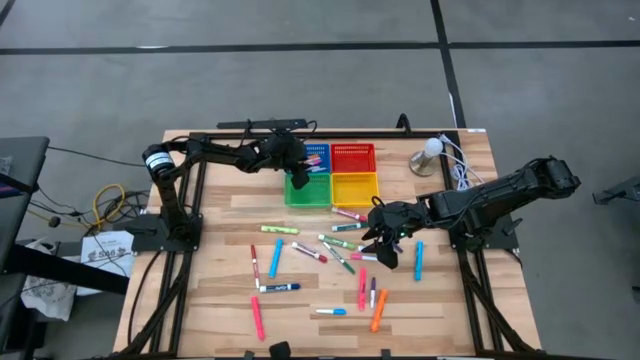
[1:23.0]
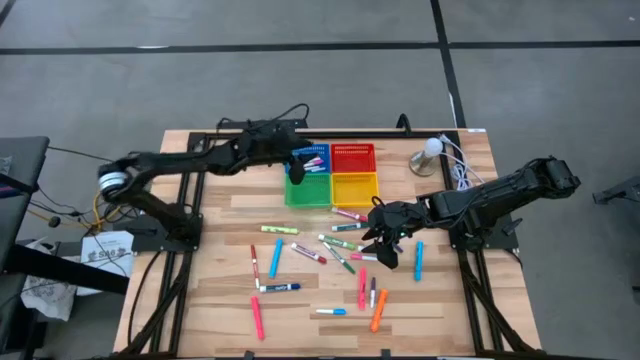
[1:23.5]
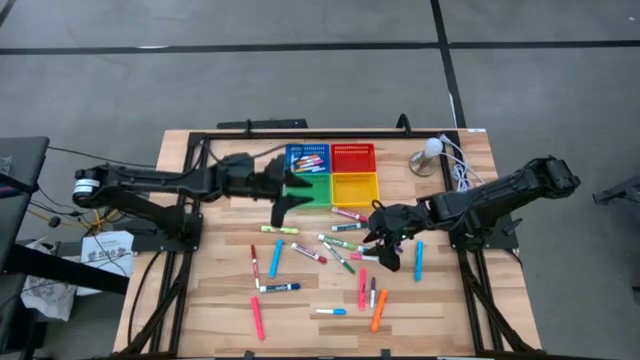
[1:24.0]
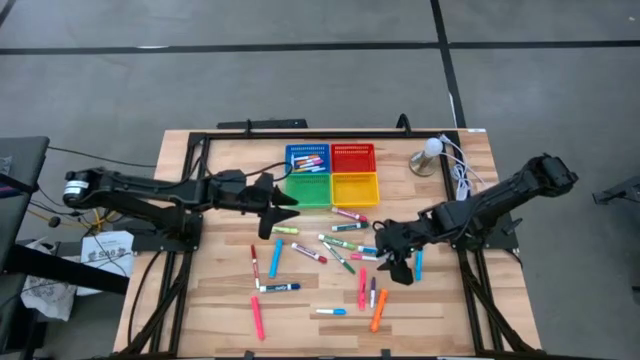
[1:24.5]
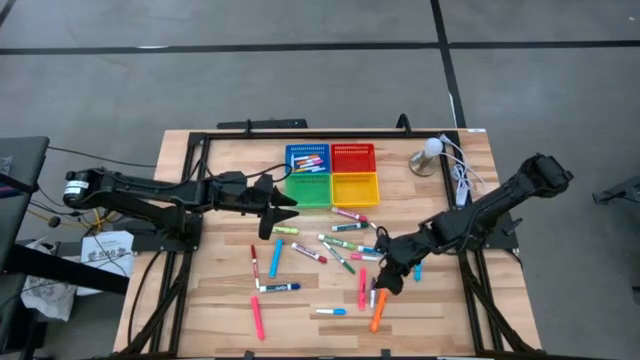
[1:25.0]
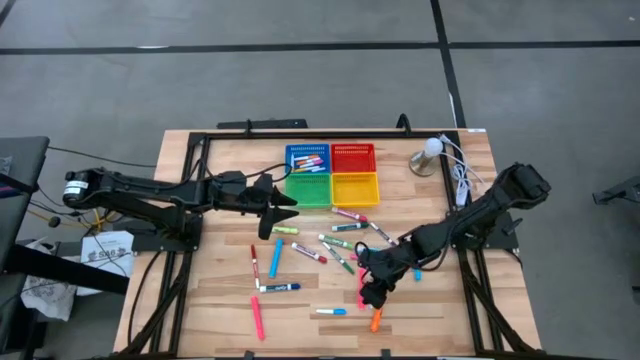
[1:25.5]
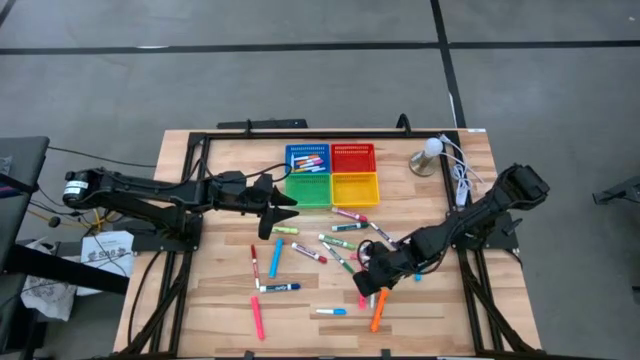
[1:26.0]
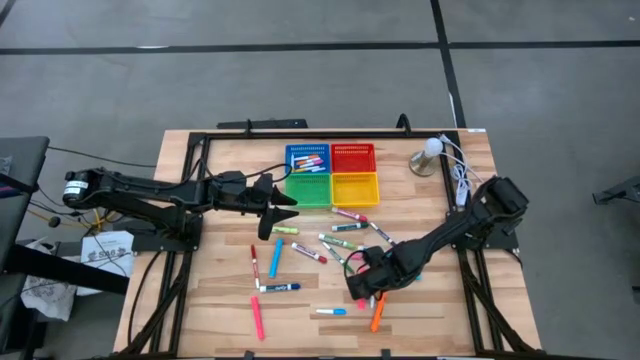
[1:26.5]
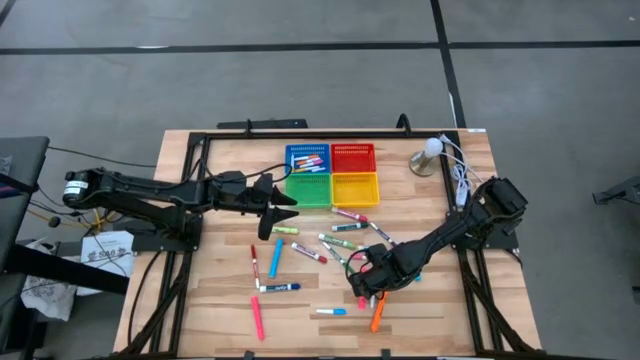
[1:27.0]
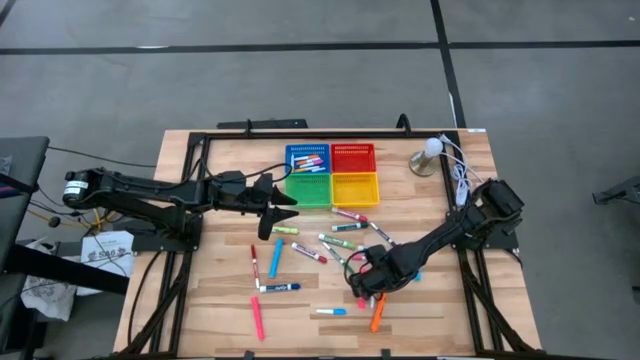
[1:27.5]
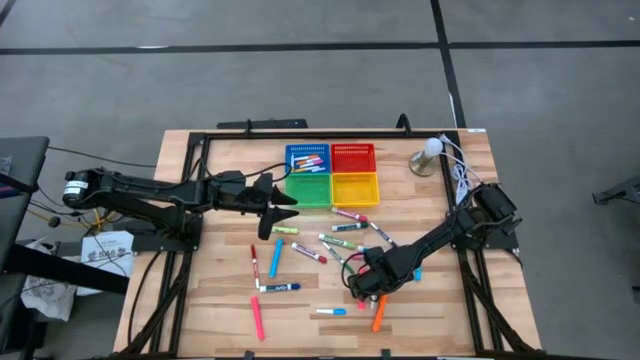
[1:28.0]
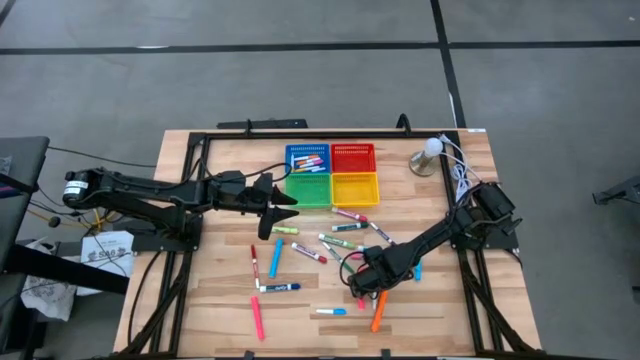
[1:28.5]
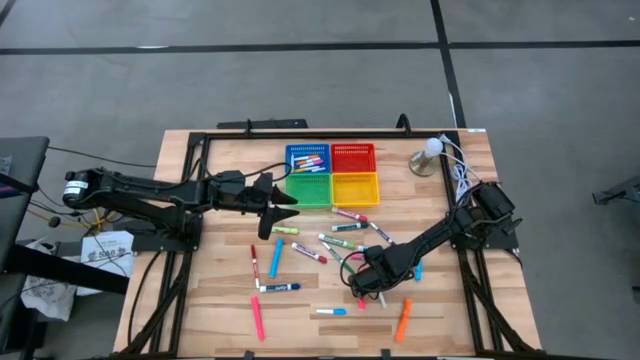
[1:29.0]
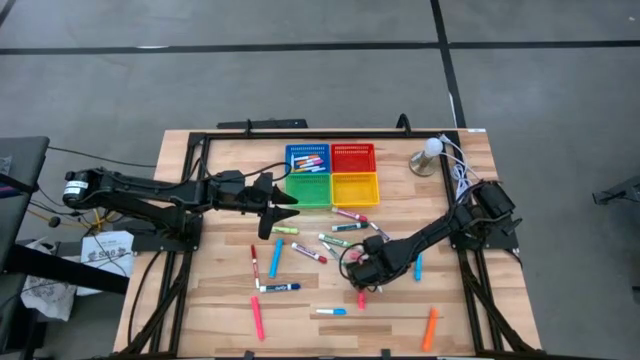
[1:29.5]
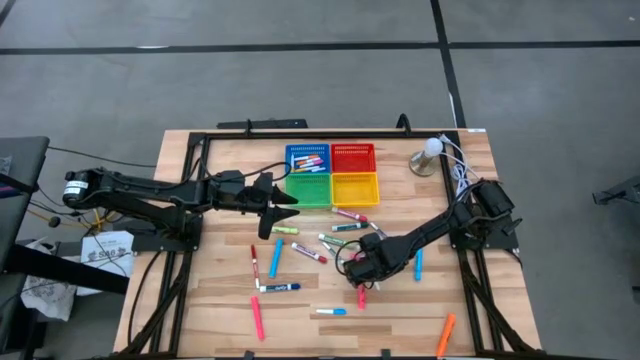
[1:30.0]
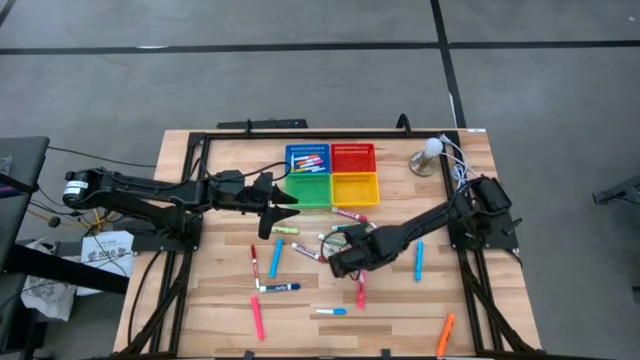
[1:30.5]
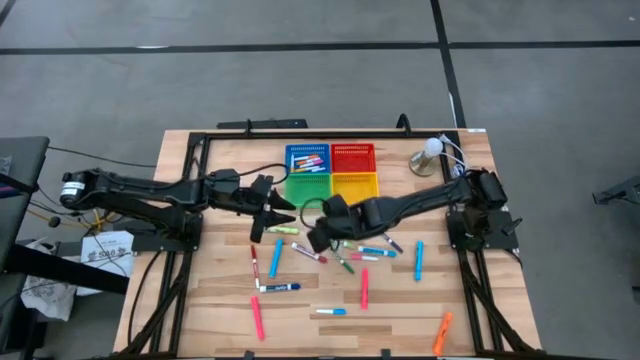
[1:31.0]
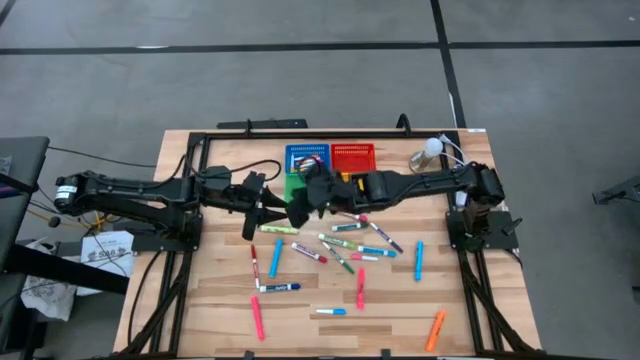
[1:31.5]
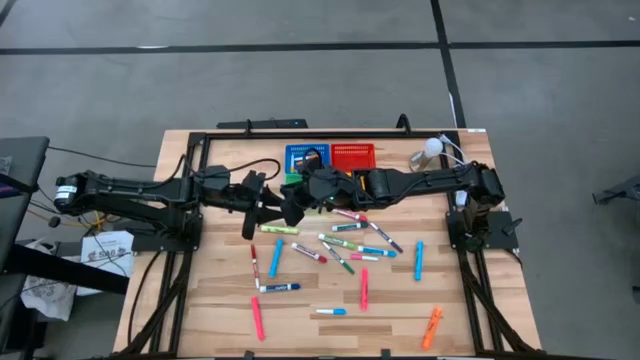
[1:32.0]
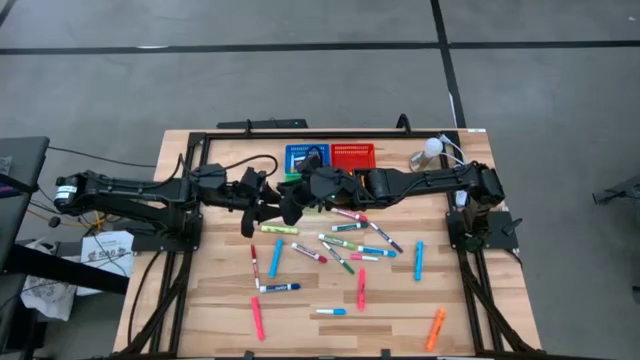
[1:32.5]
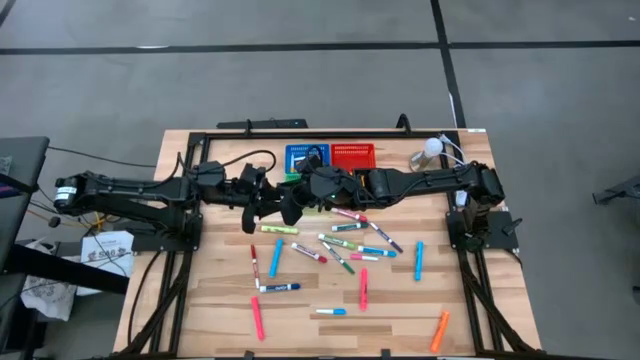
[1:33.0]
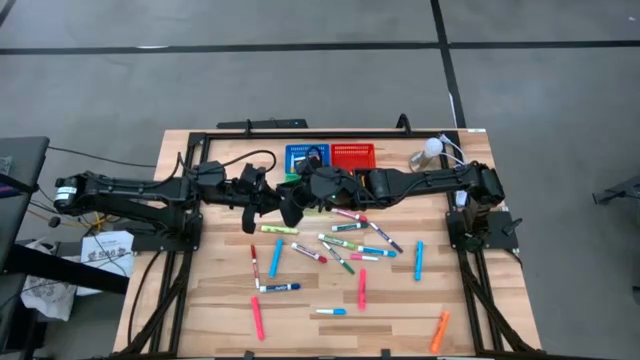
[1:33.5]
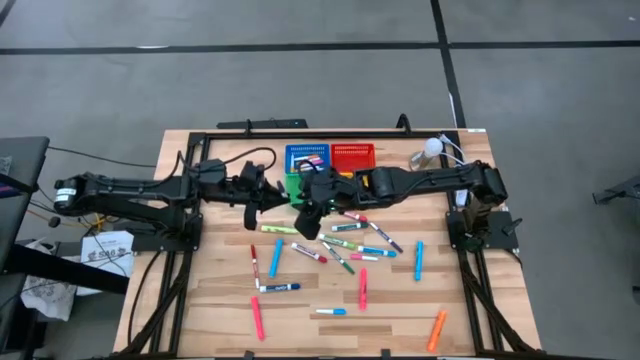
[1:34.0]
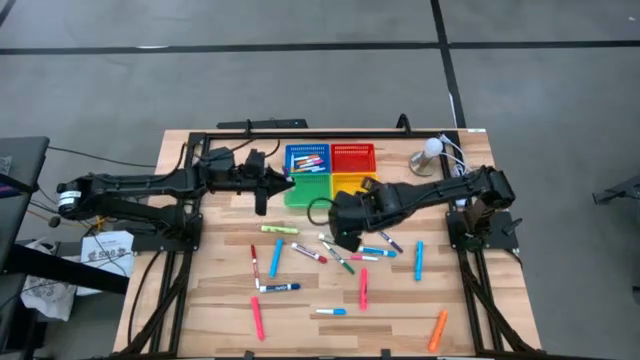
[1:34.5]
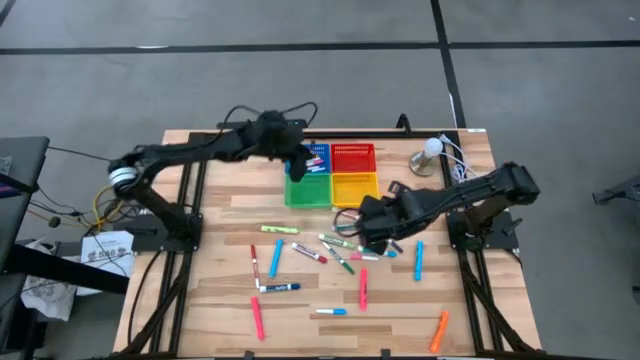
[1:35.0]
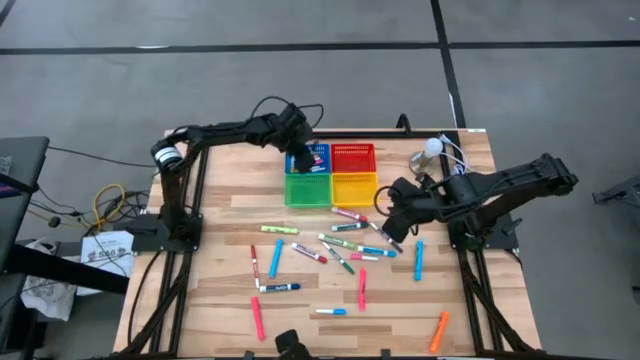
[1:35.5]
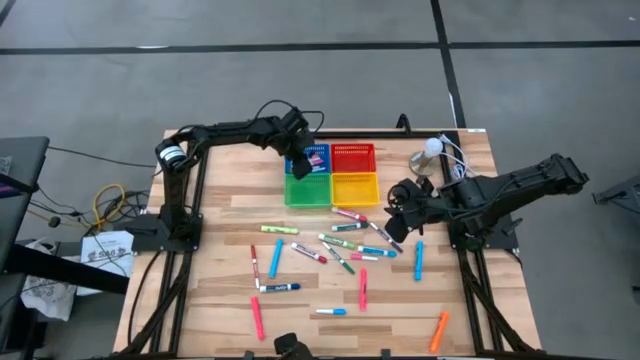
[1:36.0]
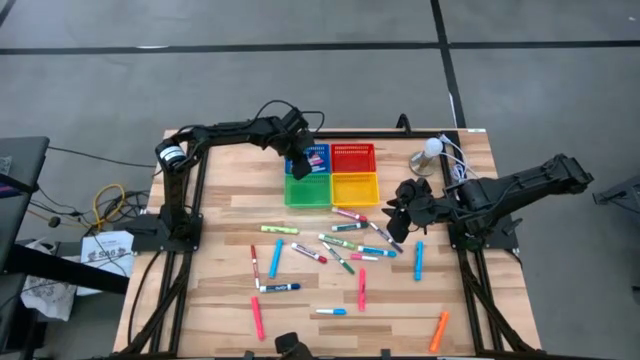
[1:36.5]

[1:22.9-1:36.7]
Task: Pick & Place Markers
Put the small violet marker into the blue bin

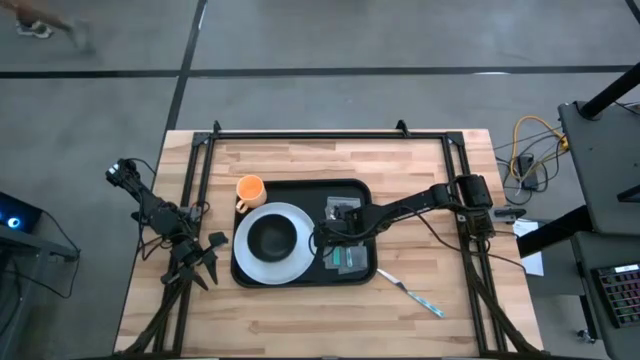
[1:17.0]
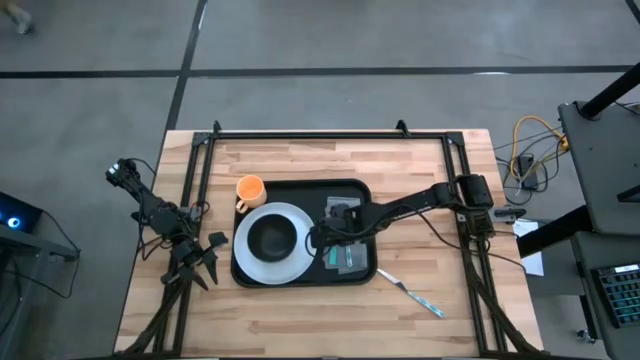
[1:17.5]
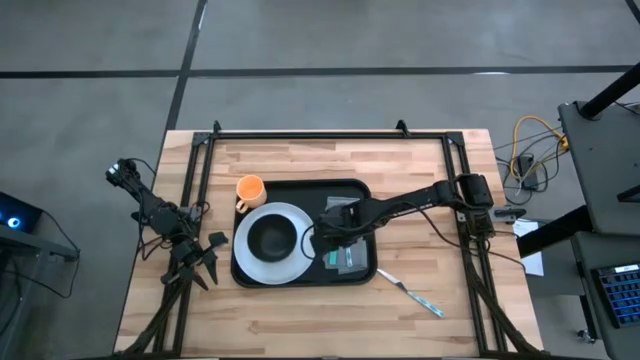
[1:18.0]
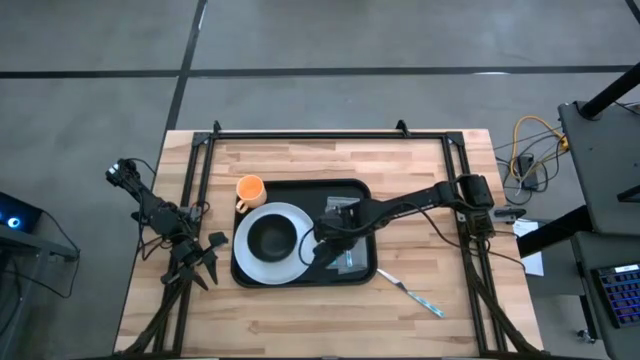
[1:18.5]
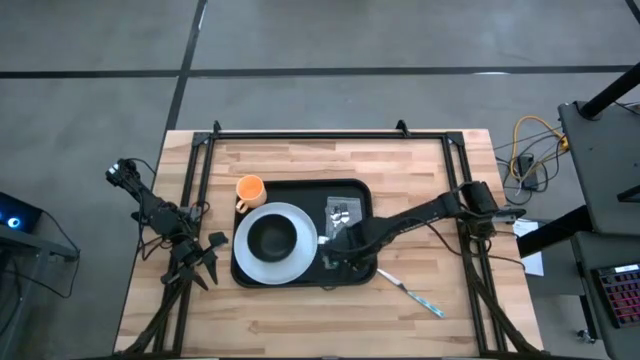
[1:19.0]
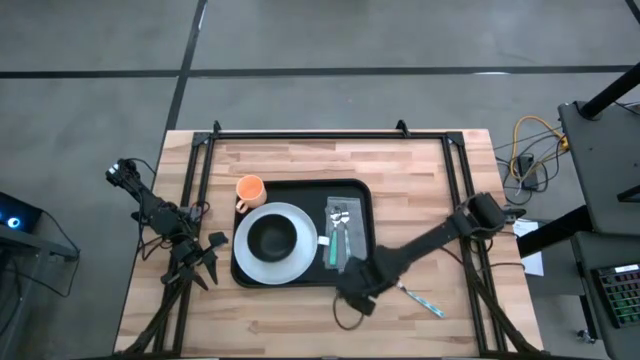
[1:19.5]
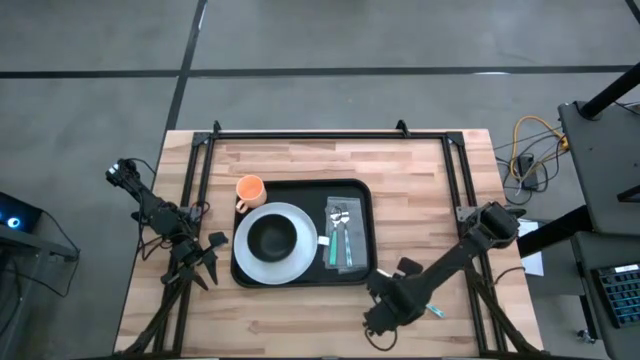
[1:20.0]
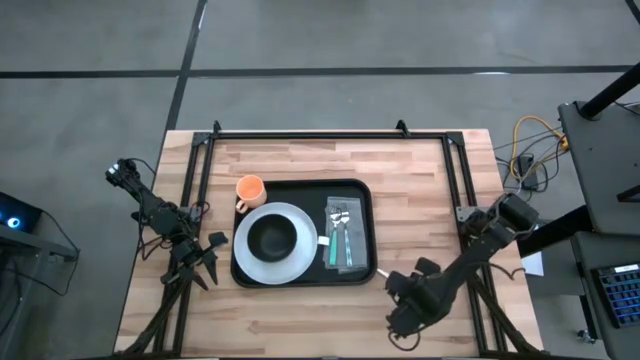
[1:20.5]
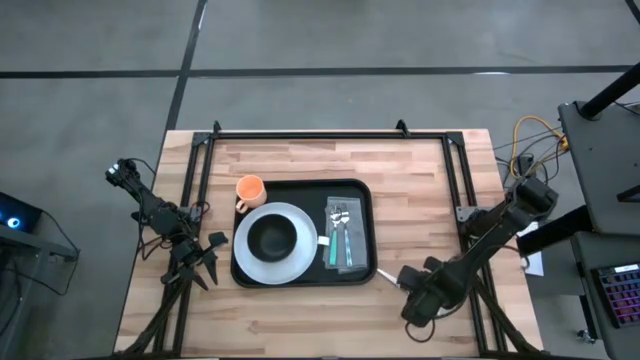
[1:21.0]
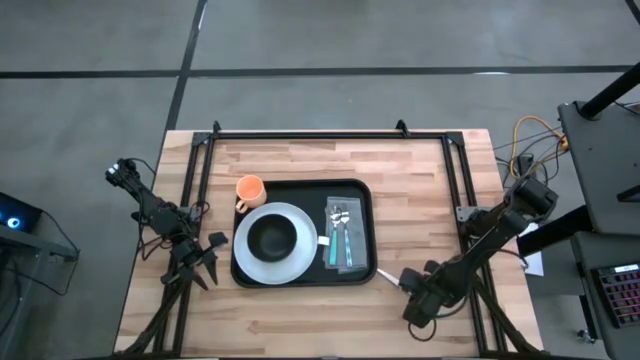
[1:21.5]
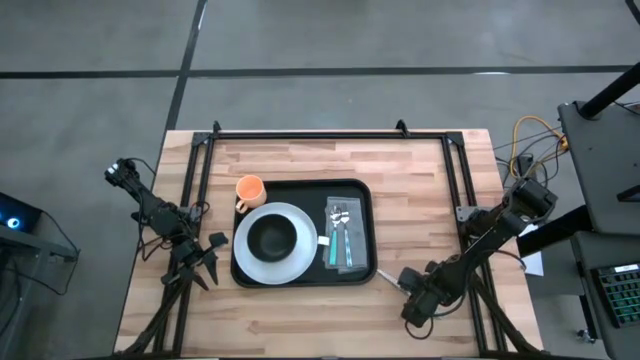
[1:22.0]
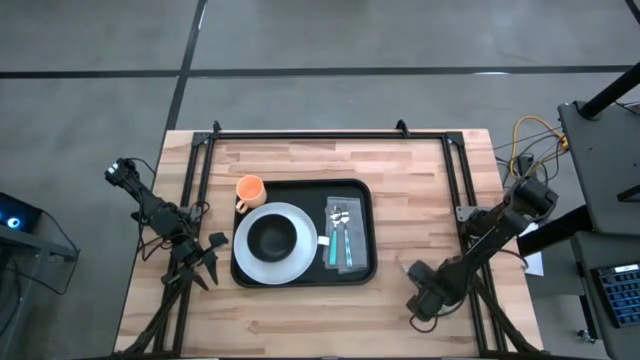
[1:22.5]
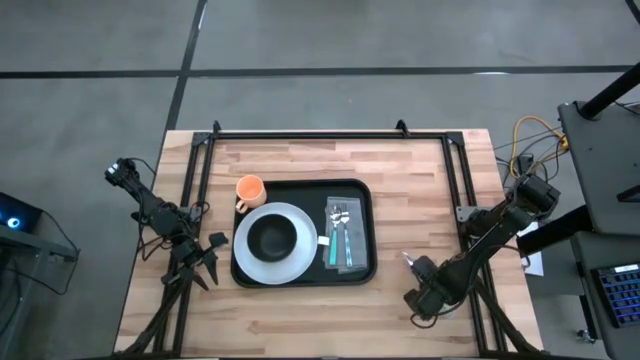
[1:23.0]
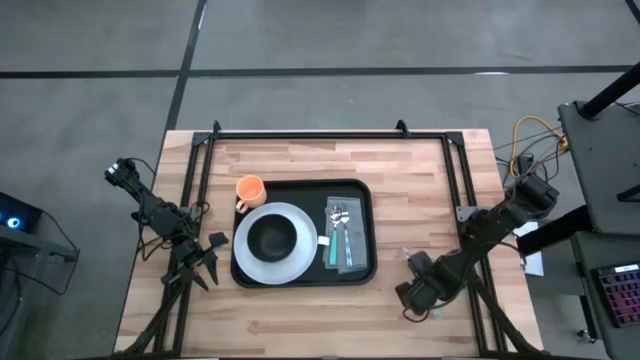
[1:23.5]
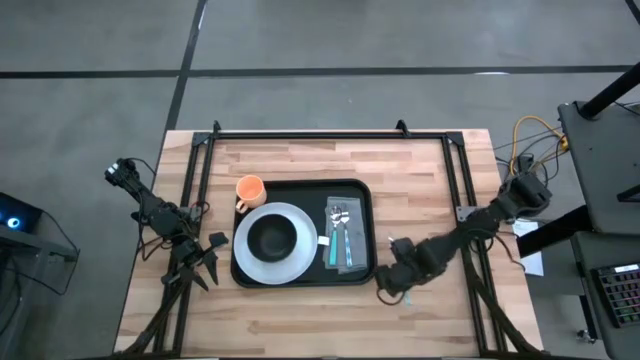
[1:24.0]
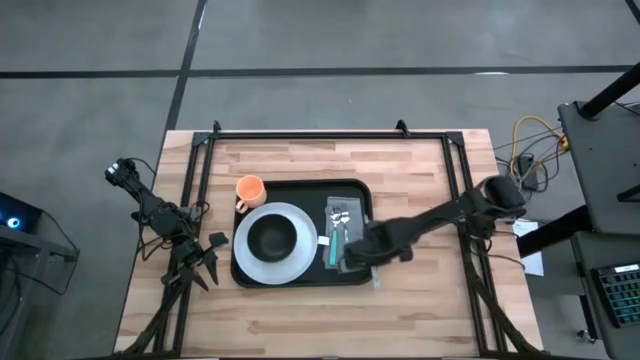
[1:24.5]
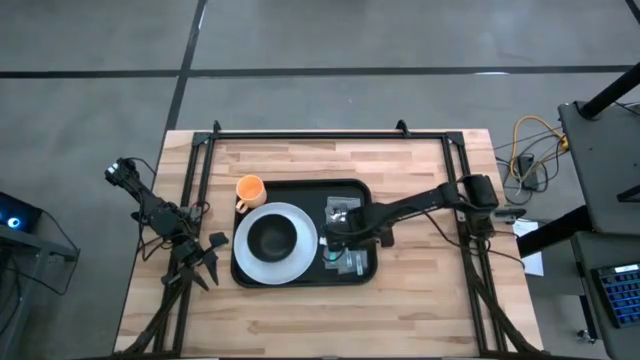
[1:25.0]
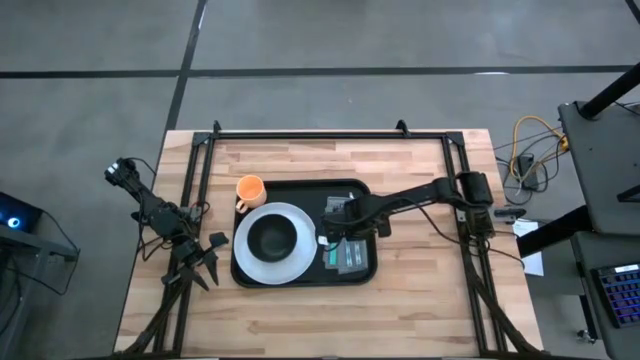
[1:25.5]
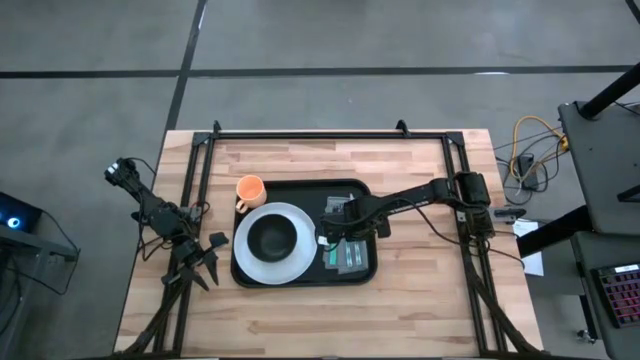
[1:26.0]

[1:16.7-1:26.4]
Task: Set up tray
Put the white and blue knife on the gray napkin to the right of the white and blue fork
